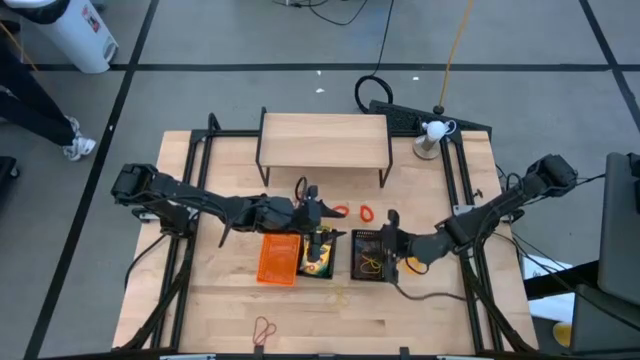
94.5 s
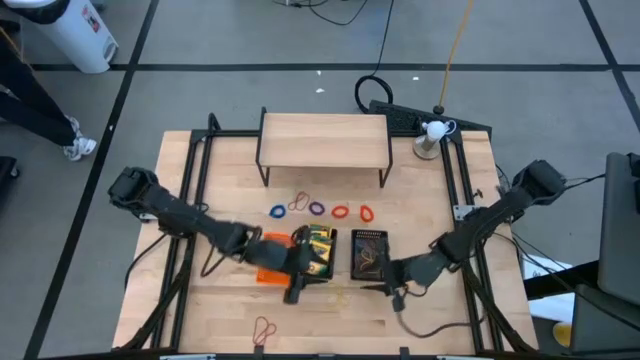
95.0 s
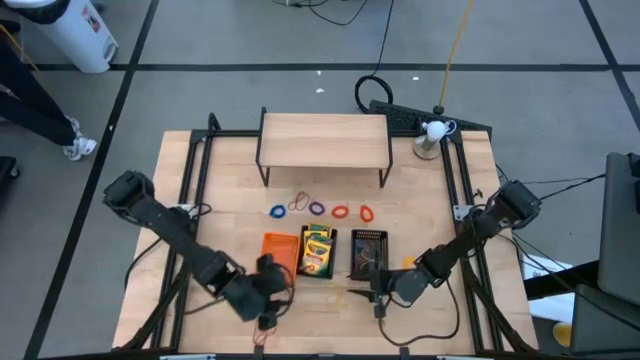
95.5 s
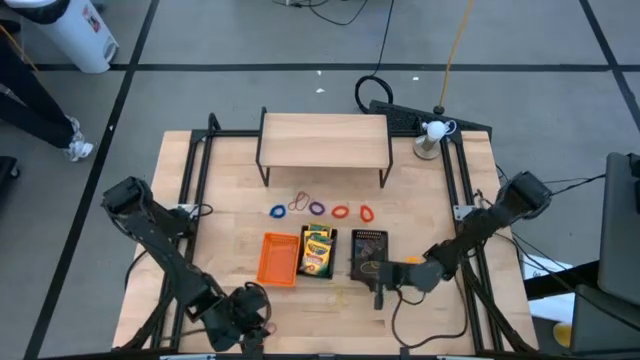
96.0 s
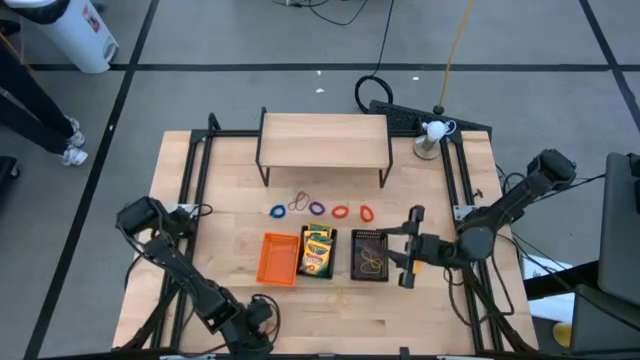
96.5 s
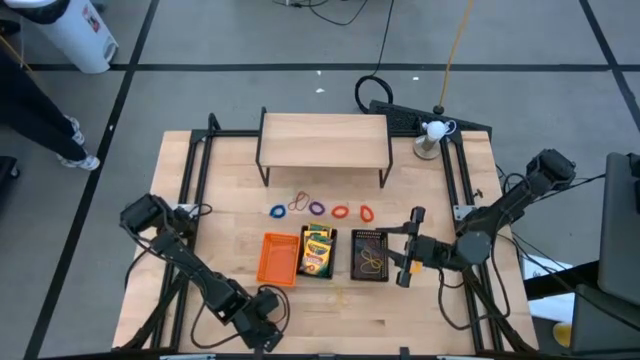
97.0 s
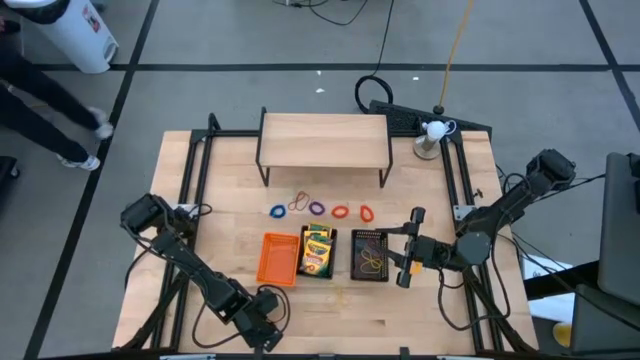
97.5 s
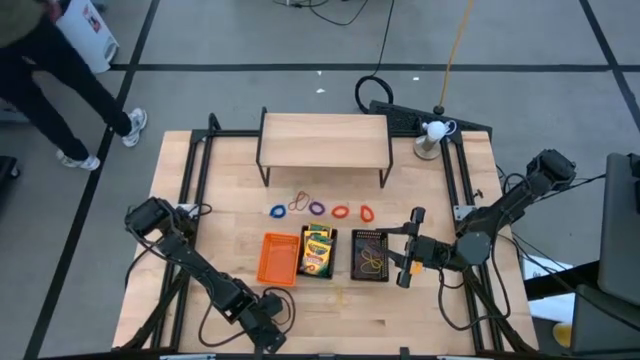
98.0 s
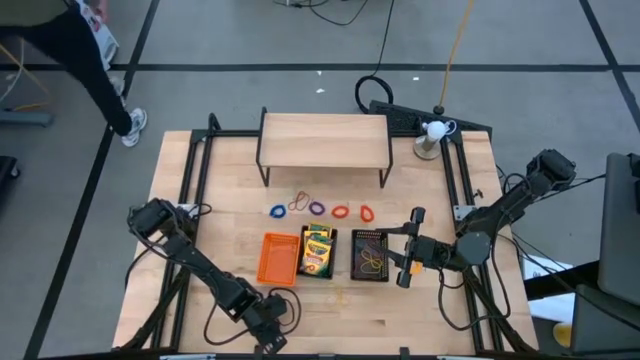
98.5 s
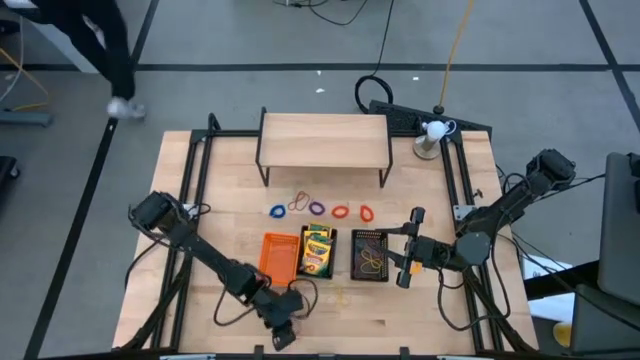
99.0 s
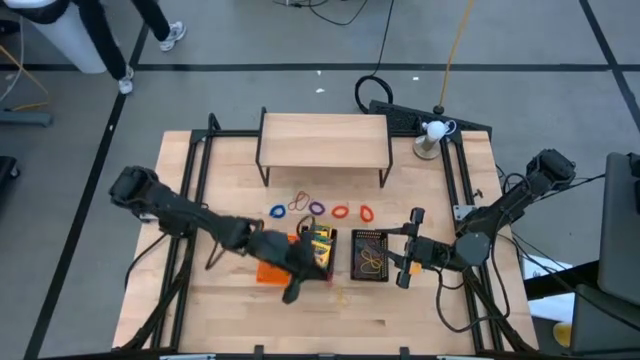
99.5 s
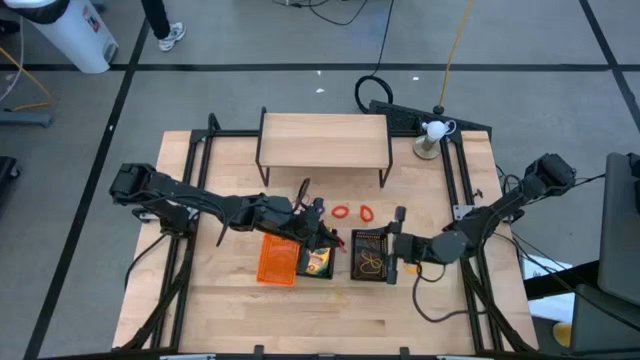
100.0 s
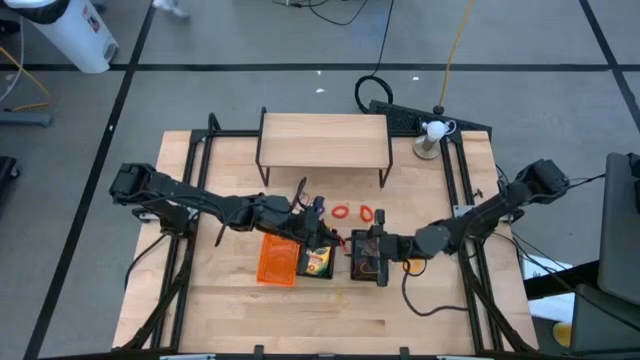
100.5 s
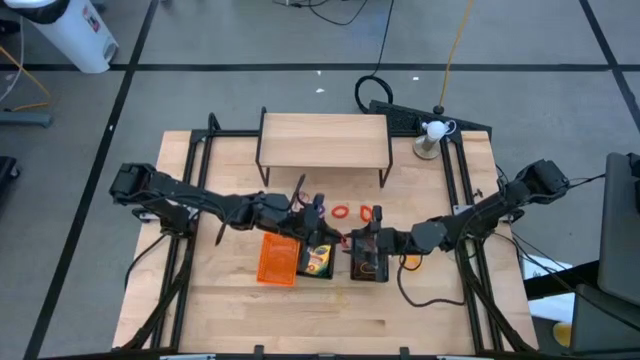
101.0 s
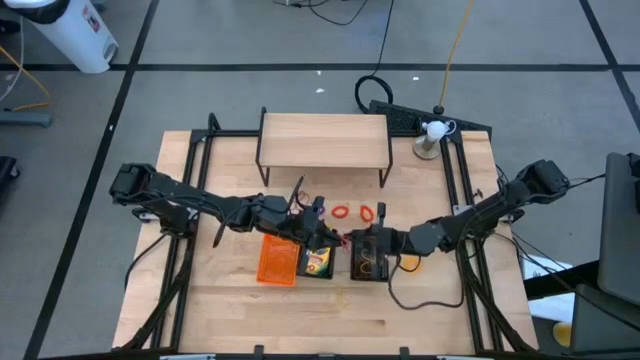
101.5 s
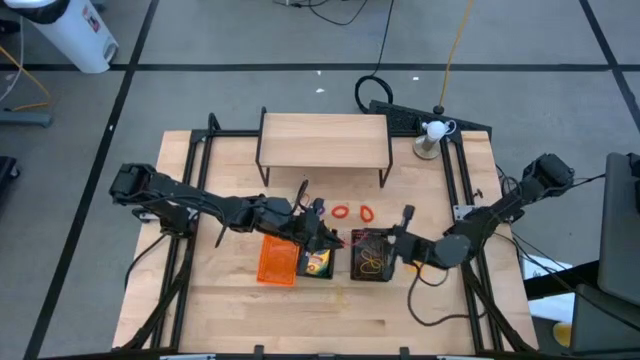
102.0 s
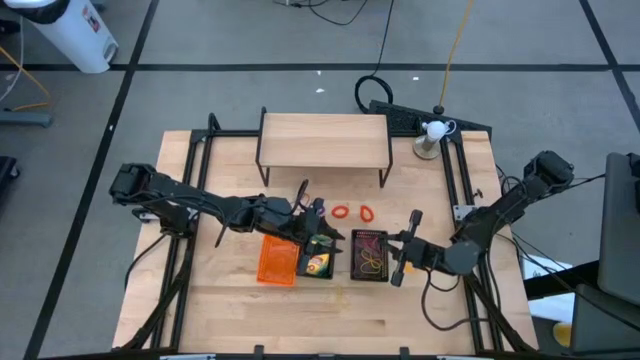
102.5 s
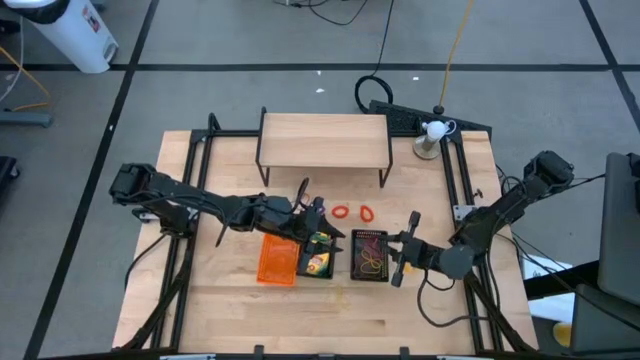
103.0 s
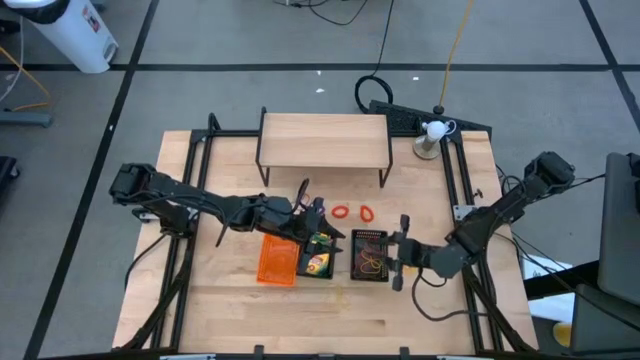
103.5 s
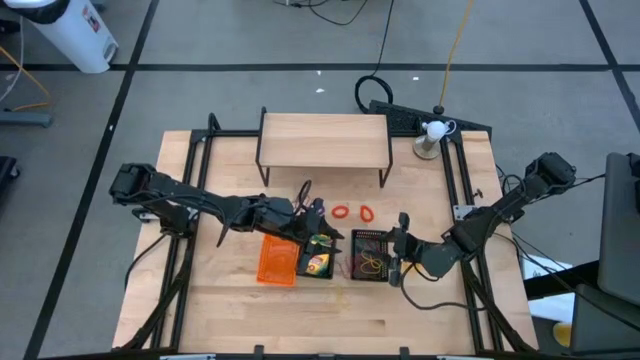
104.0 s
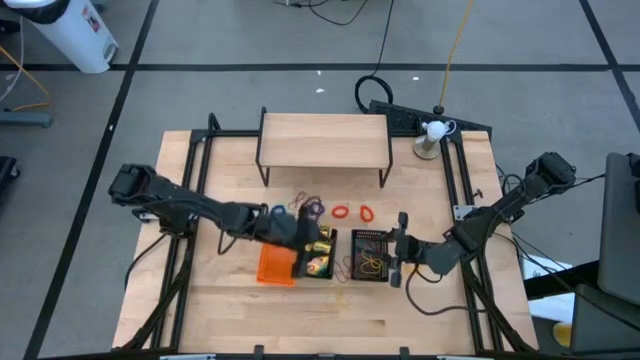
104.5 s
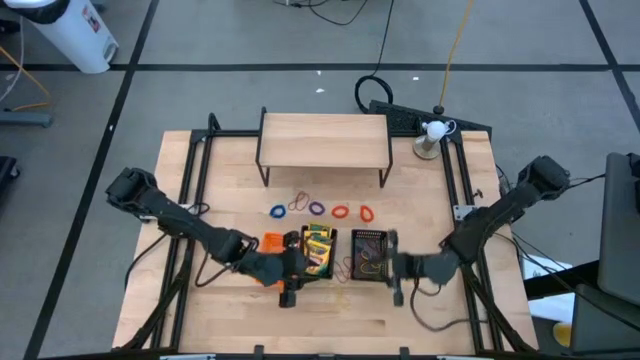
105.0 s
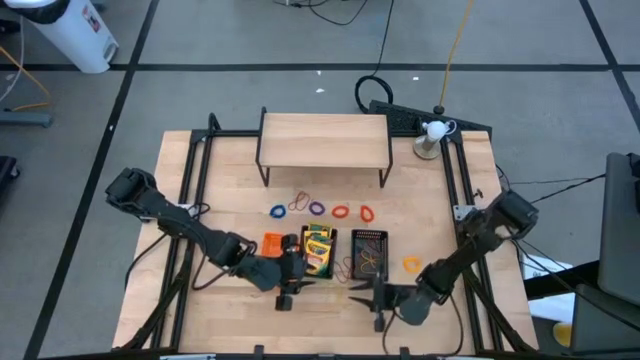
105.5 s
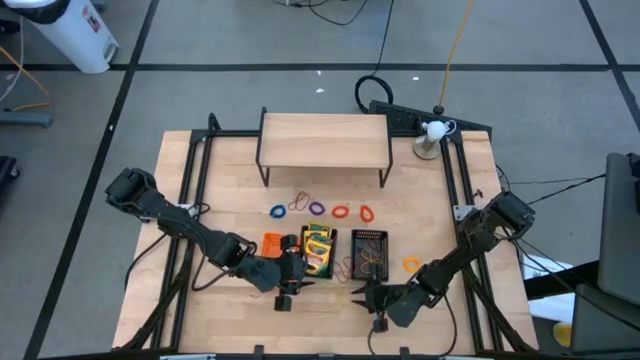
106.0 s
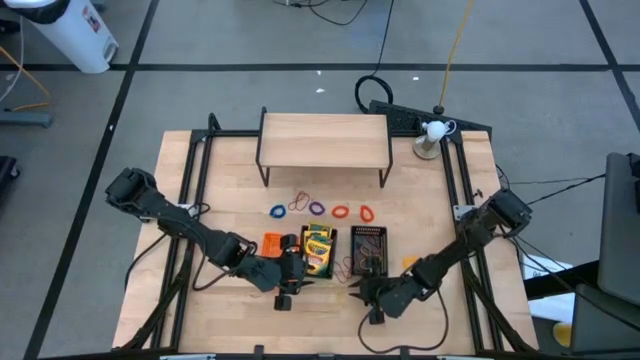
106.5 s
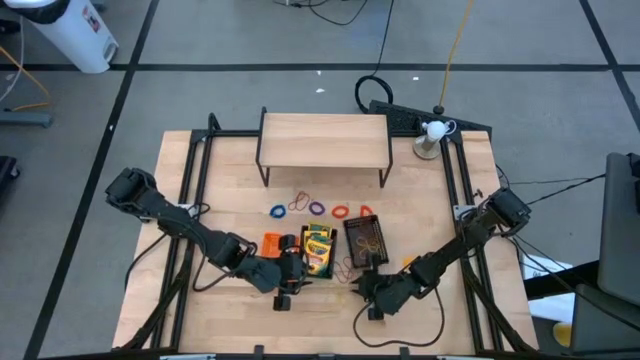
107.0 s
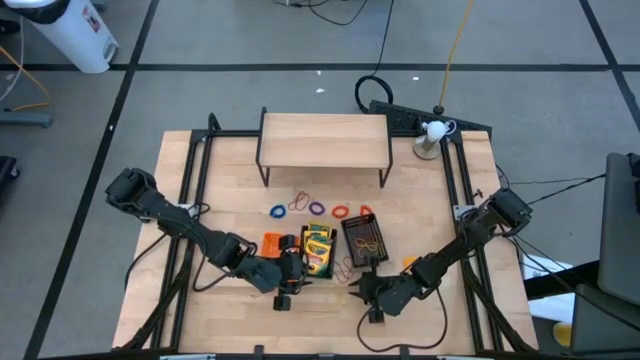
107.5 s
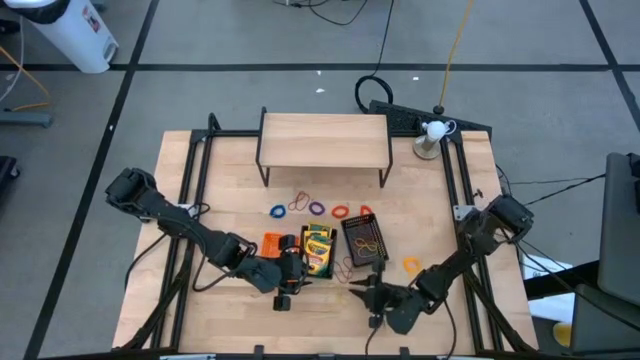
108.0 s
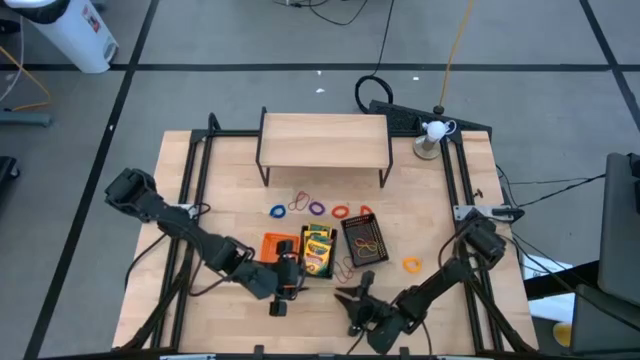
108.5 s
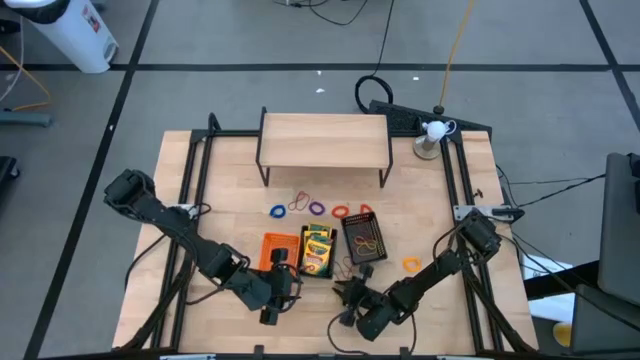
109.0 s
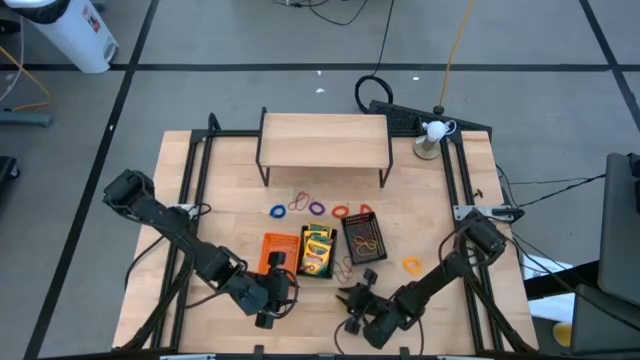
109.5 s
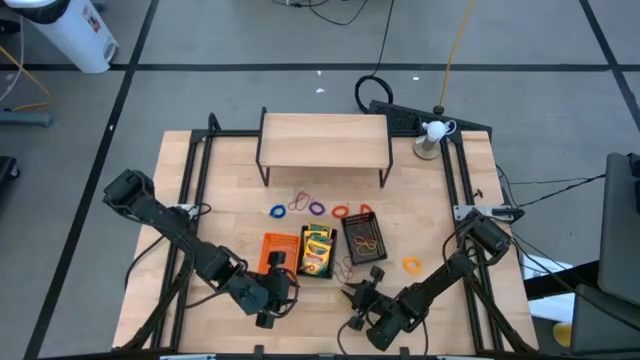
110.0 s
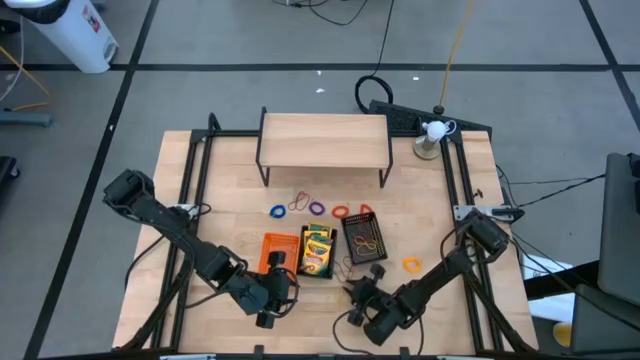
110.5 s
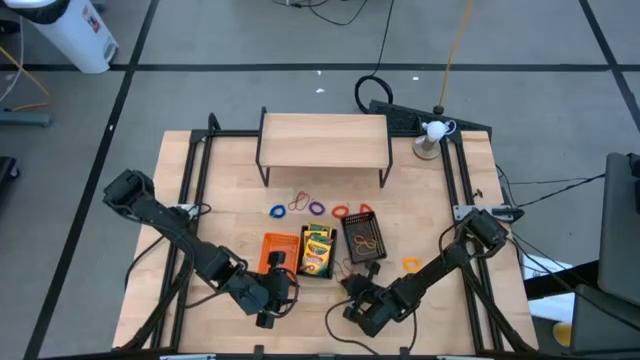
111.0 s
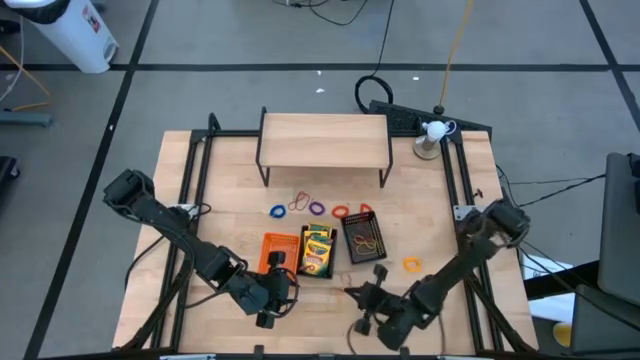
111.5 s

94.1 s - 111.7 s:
Task: Pick & Place Office Desk Supplies
Put the red rubber band into the right black bin
